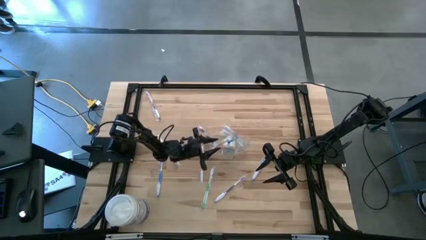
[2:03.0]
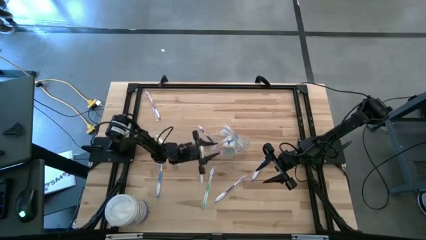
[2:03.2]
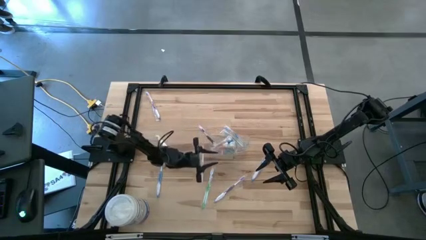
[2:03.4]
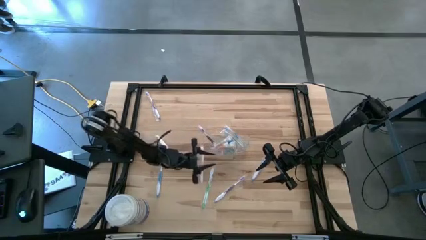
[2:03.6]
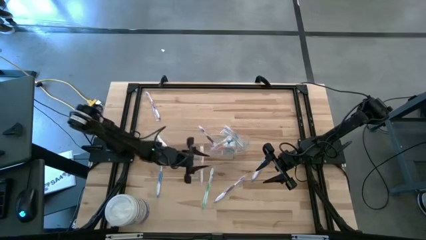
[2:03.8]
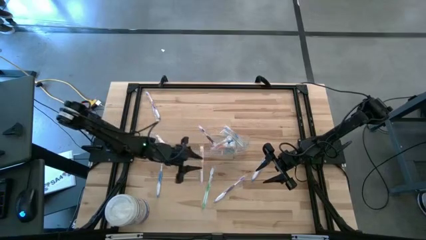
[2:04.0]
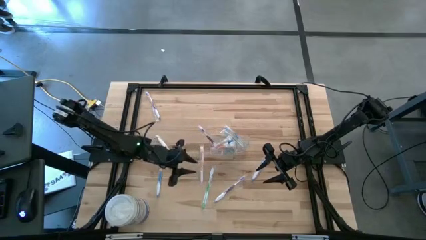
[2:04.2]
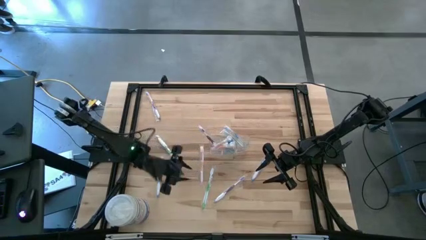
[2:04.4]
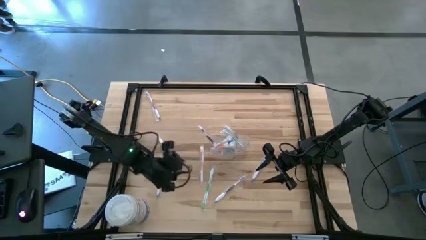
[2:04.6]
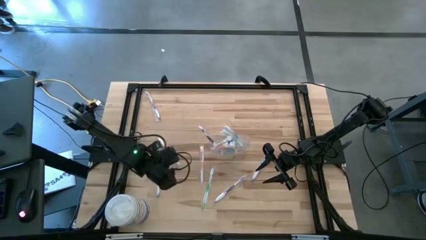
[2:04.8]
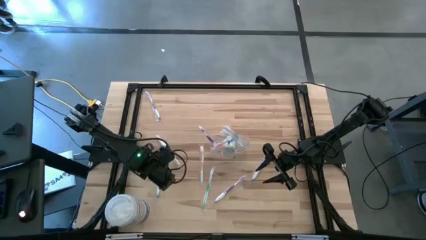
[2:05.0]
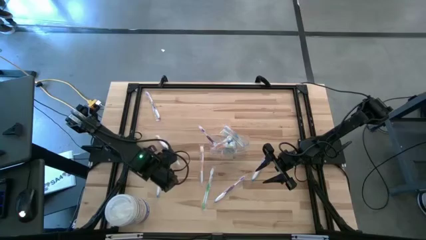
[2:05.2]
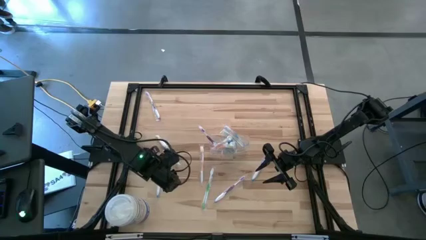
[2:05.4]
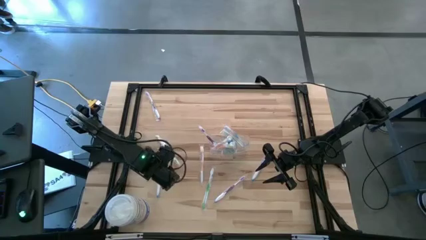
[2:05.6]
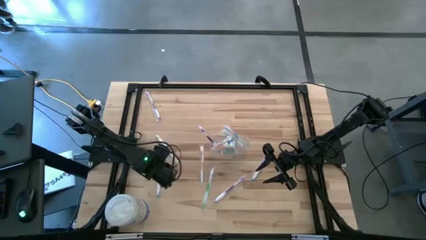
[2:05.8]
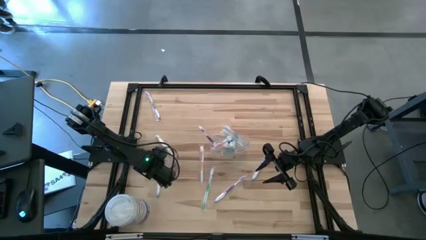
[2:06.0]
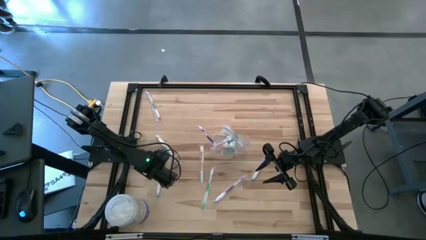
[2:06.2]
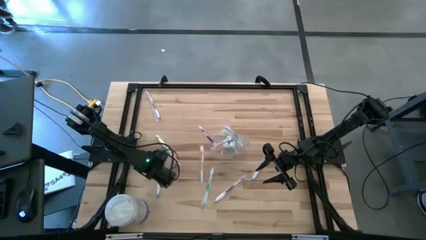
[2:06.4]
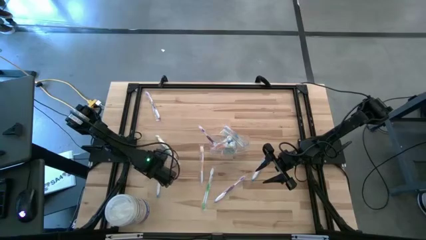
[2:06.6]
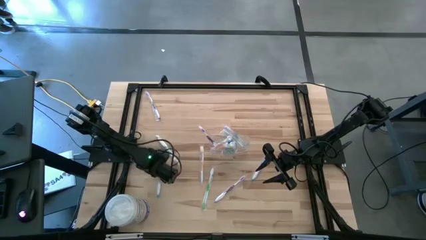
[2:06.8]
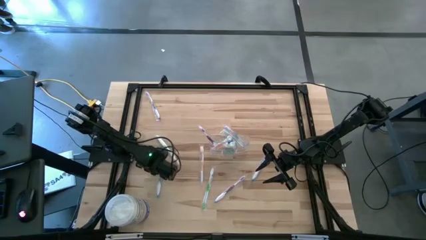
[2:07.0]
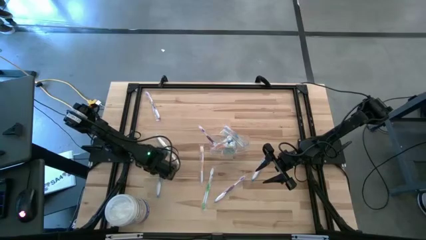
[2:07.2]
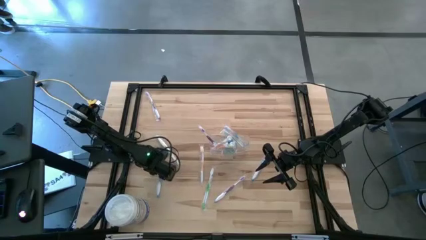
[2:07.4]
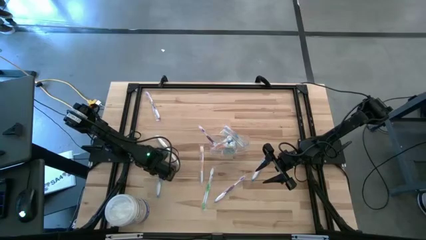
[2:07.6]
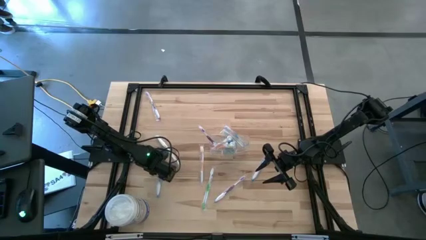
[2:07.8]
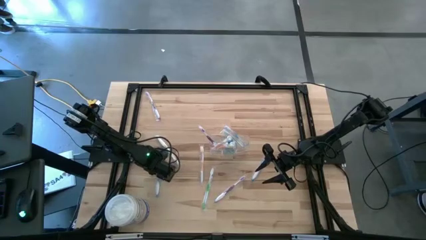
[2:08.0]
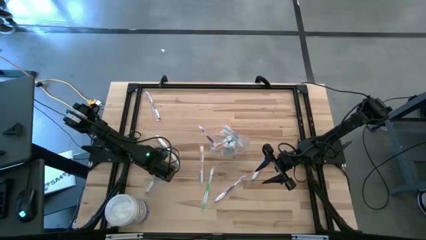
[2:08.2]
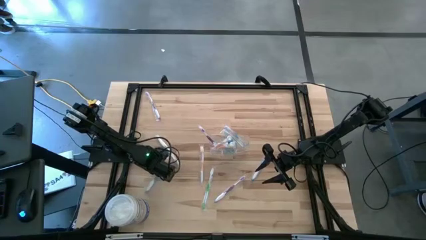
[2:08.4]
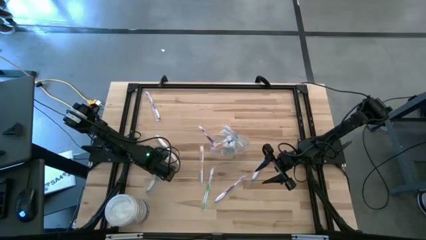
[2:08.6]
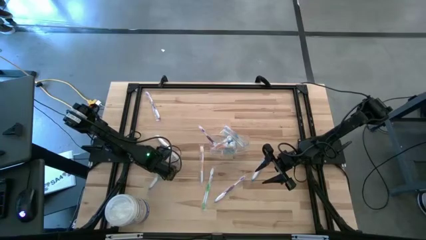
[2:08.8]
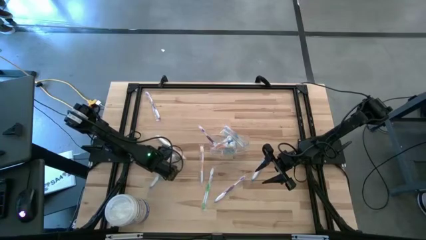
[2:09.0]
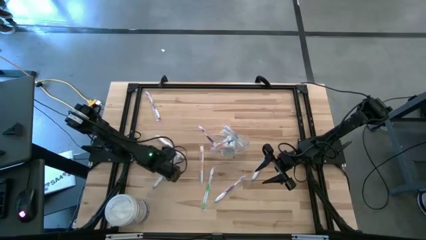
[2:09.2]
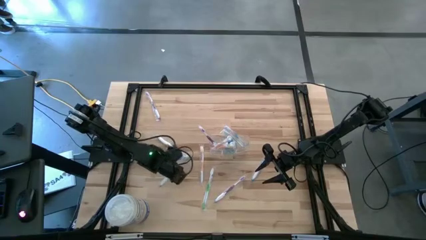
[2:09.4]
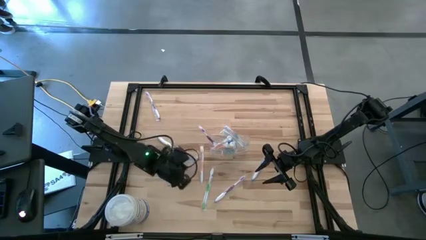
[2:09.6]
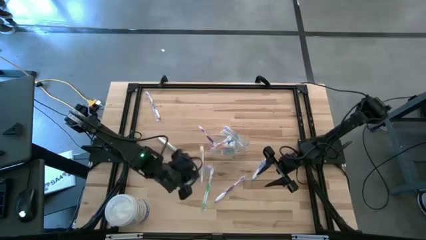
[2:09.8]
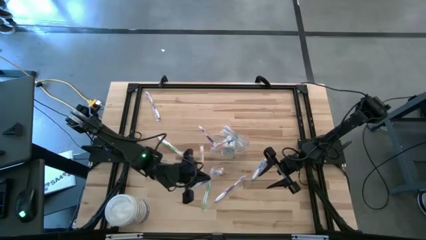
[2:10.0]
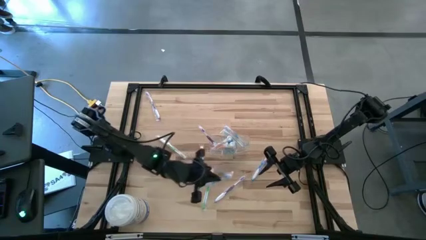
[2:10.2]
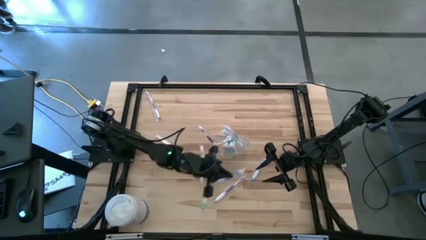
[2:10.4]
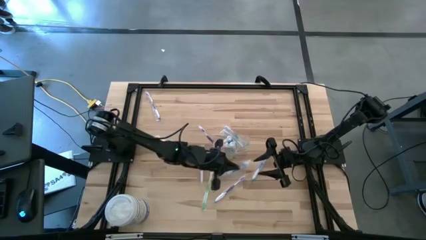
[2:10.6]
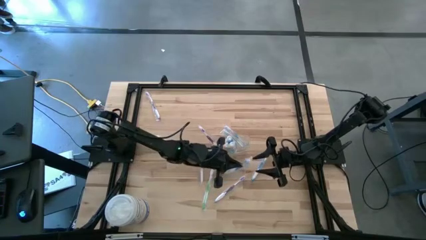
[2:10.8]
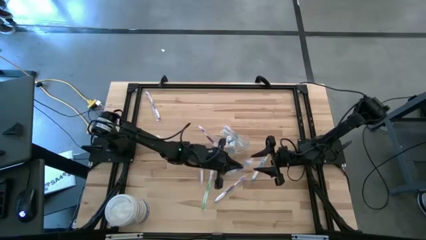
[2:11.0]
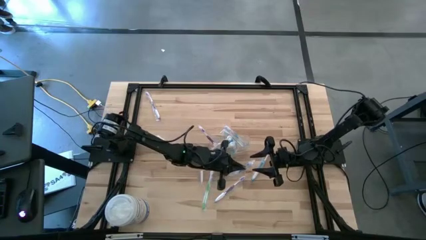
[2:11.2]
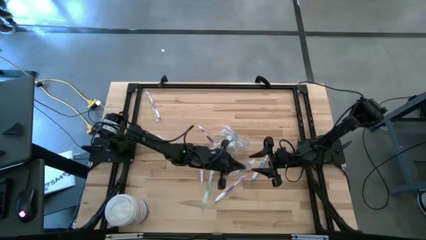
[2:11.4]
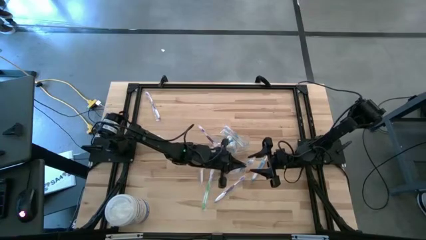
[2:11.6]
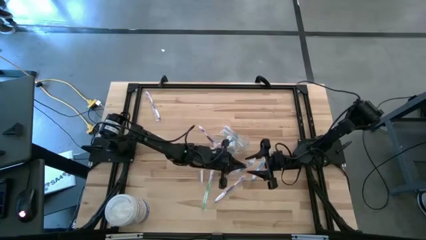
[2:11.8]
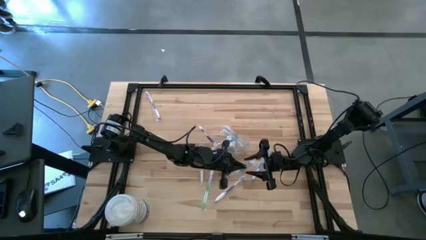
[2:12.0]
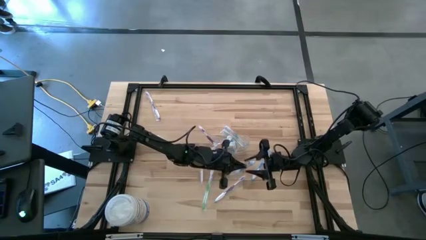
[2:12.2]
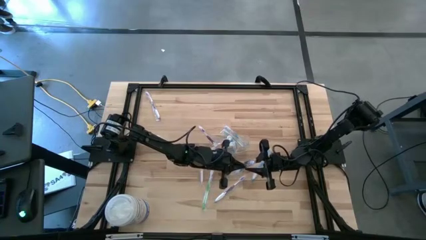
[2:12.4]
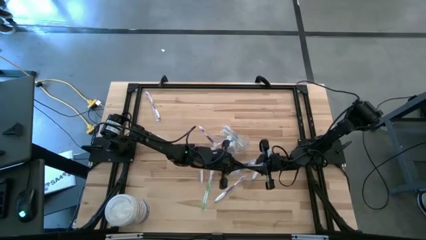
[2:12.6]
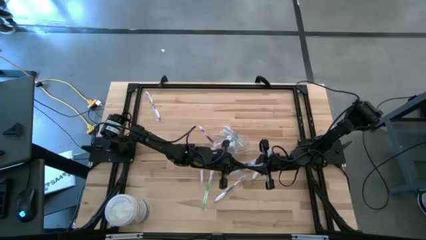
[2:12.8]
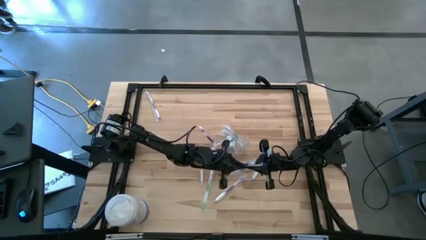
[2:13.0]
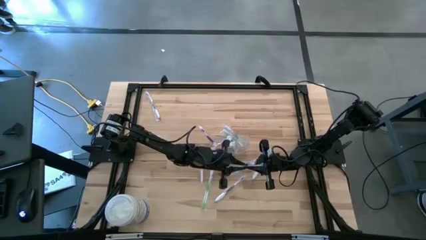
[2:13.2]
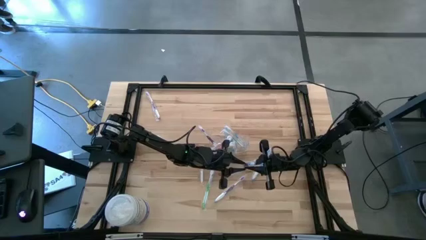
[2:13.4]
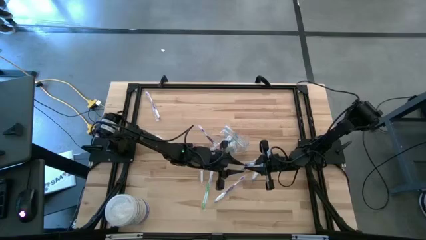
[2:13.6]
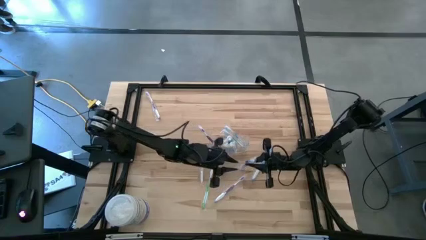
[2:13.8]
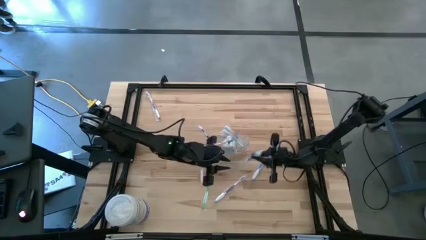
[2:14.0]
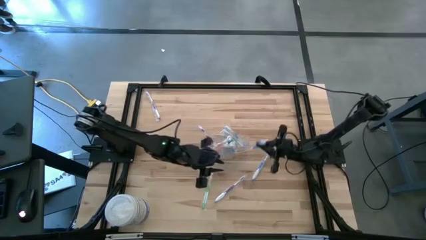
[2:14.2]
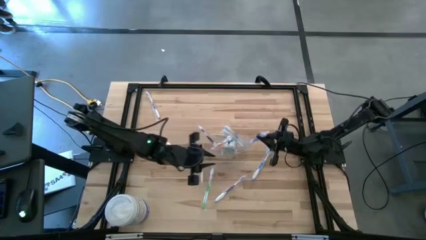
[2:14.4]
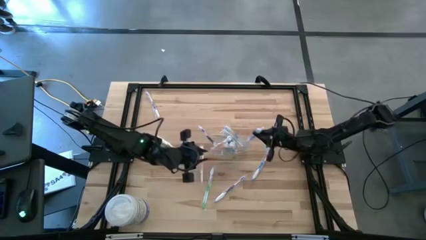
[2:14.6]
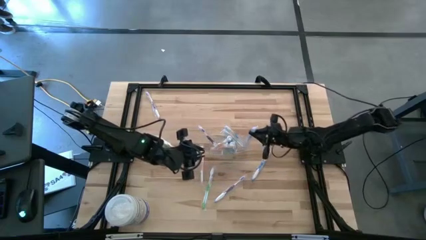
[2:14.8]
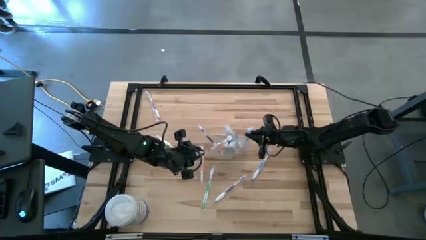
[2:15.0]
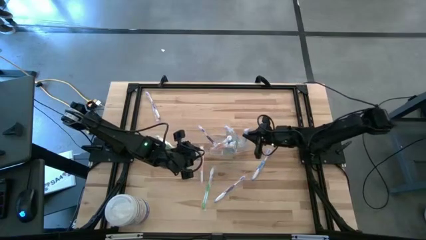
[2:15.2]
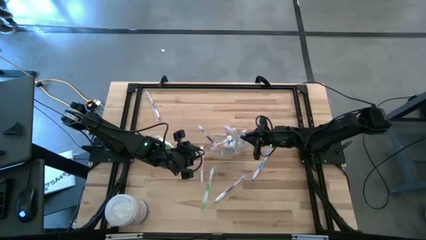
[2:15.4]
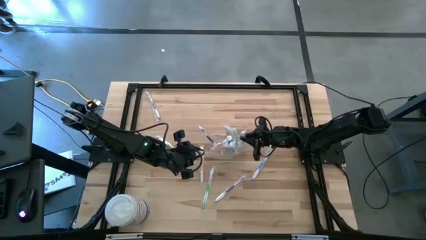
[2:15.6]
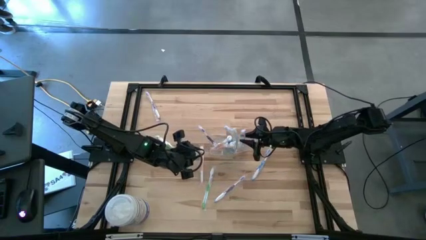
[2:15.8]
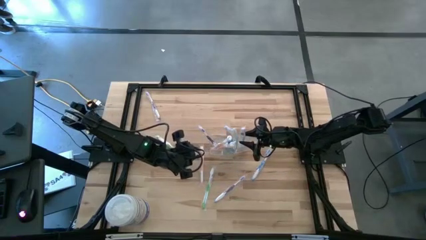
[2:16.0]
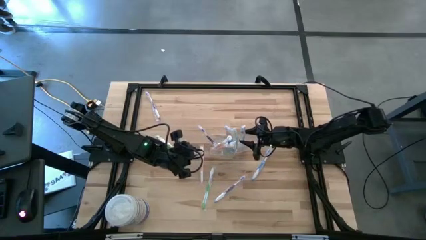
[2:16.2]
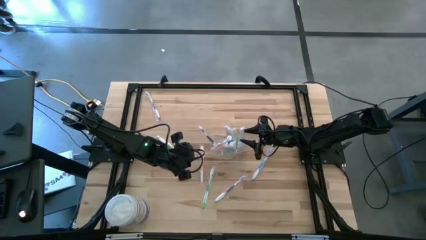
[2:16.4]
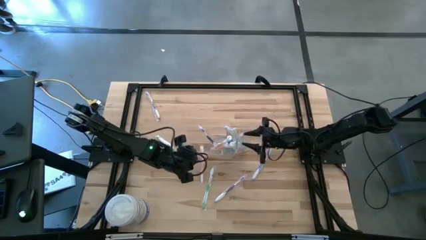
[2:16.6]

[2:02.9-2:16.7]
Task: Pick & Place toothbrushing station
Put the left blue toothbrush into the wire organizer
